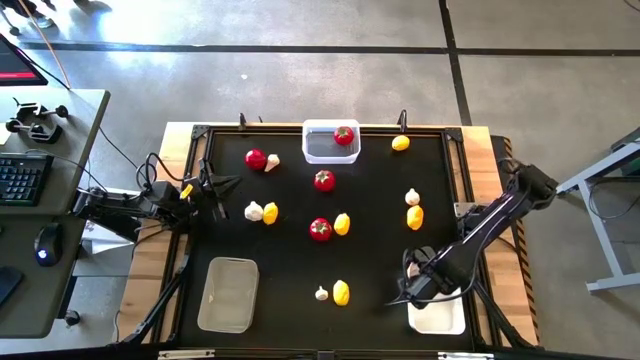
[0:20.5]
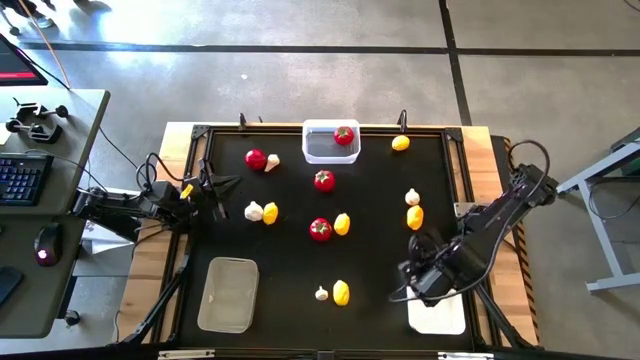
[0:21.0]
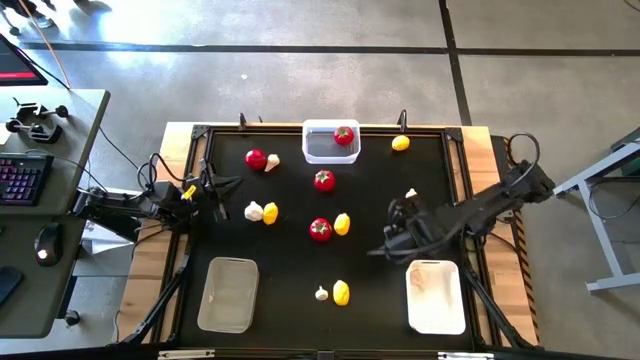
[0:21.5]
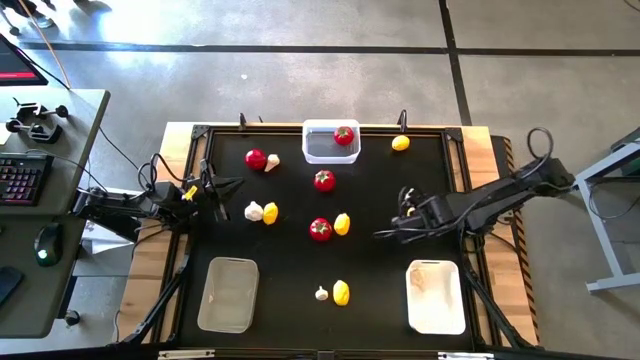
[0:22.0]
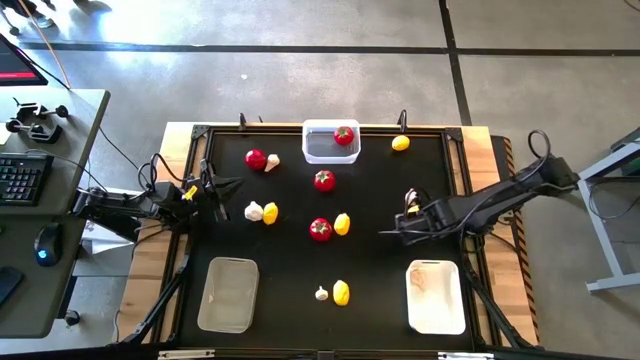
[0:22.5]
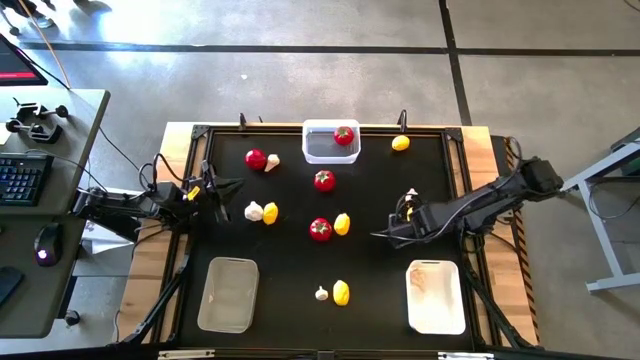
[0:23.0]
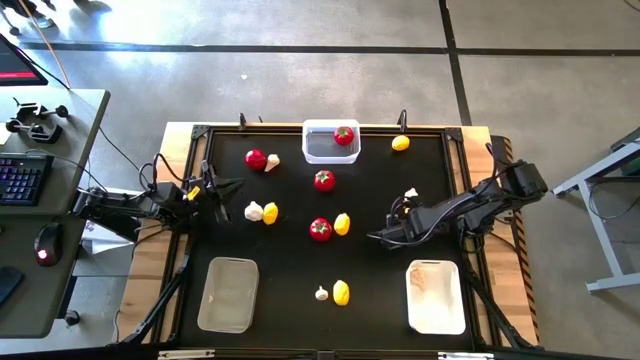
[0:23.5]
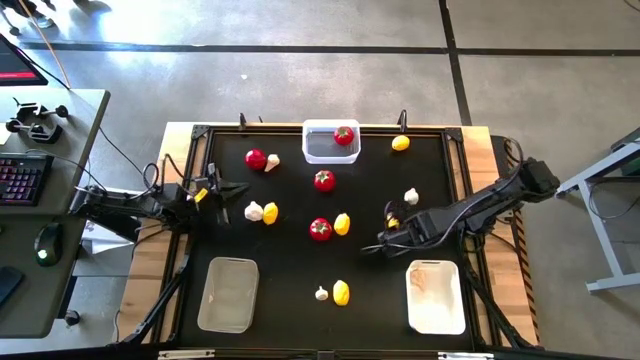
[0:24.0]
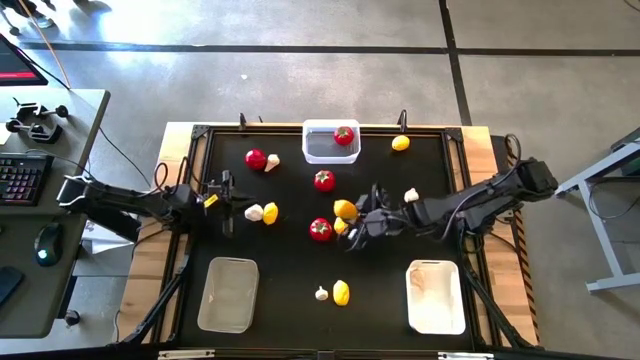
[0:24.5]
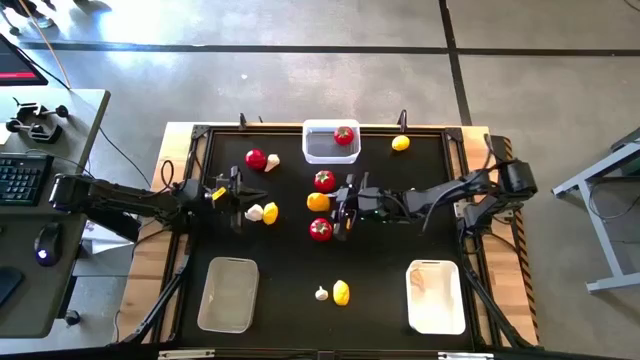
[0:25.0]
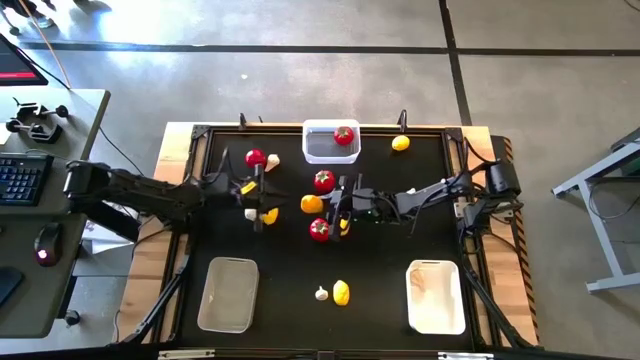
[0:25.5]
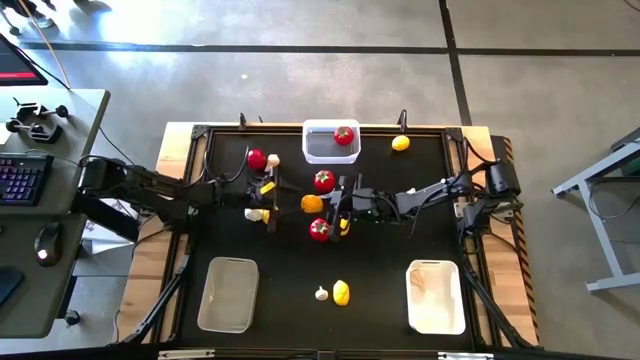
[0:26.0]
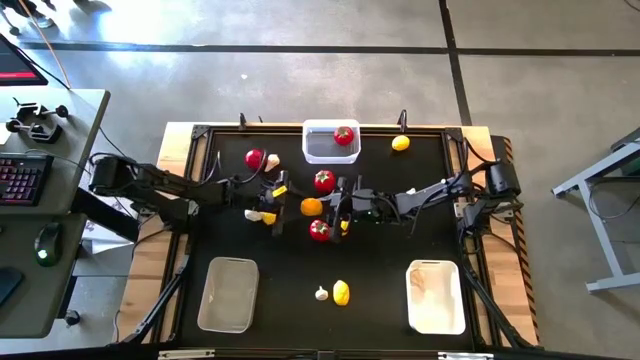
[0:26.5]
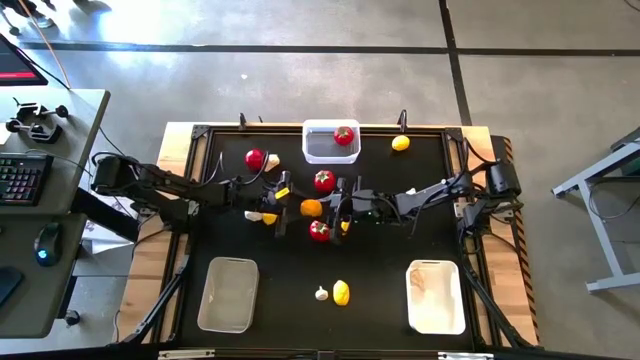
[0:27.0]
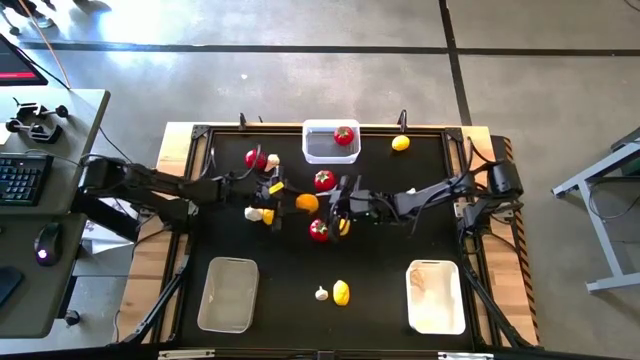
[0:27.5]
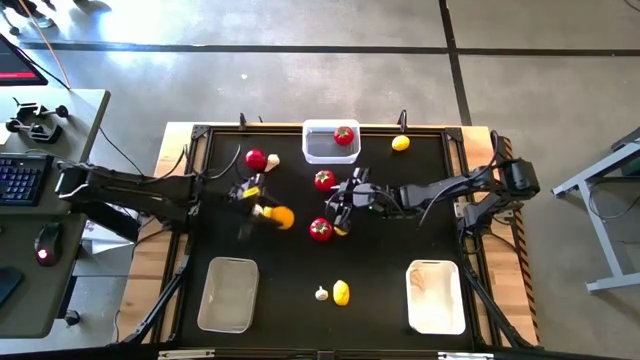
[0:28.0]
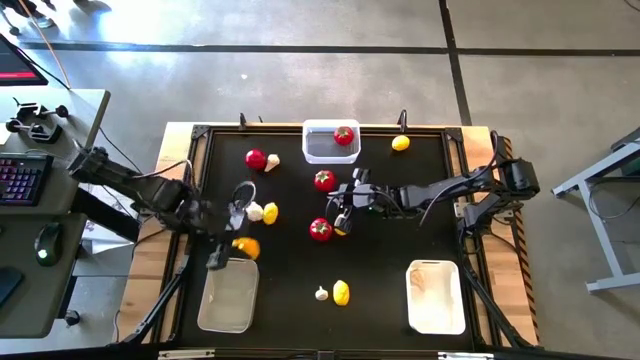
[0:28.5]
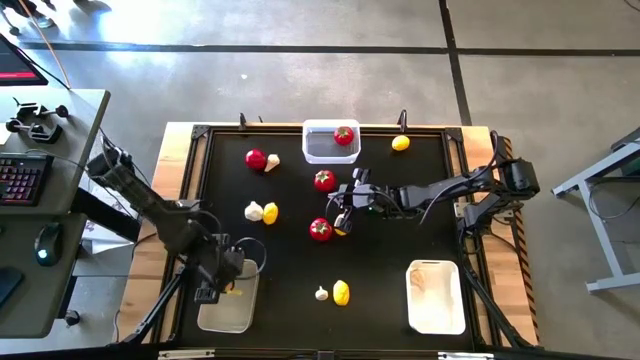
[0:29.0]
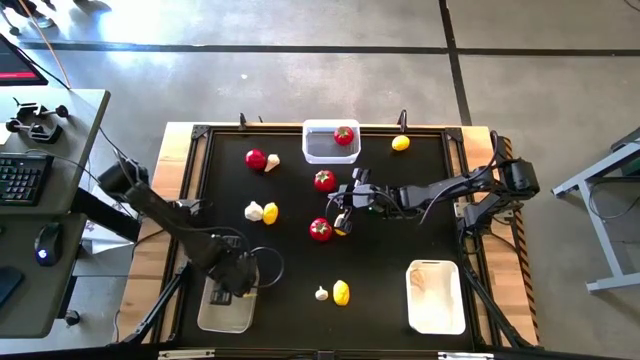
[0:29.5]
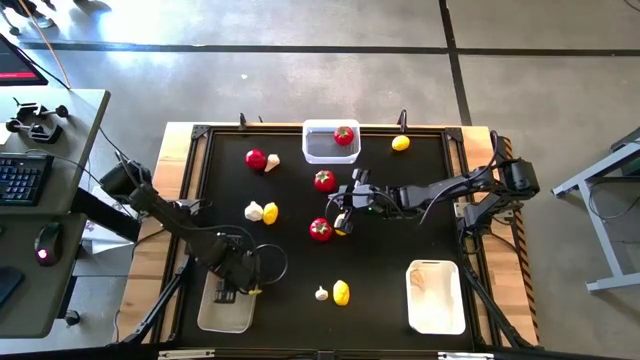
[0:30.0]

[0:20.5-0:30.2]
Task: Sort produce into baskets
Put the yellow lemon into the gray bin

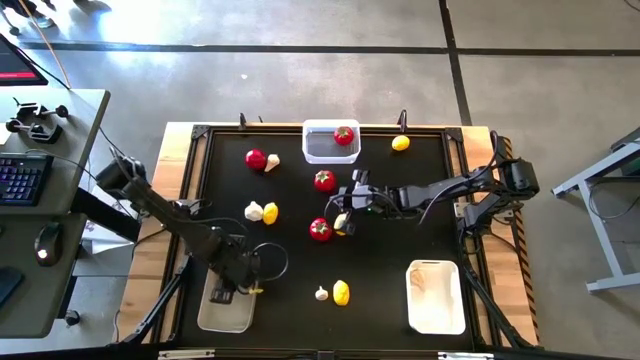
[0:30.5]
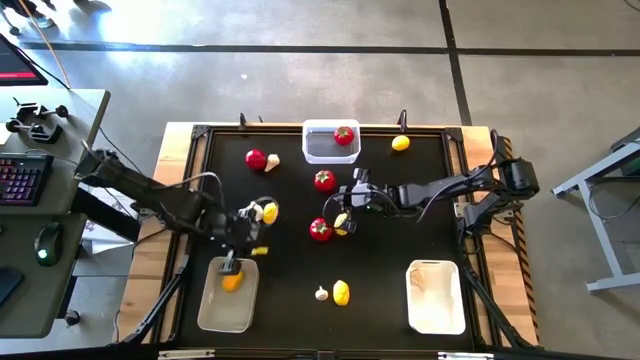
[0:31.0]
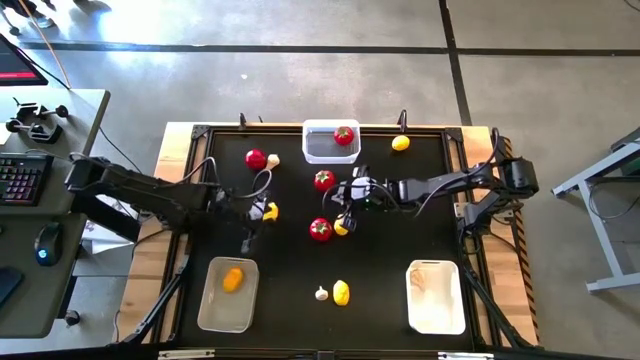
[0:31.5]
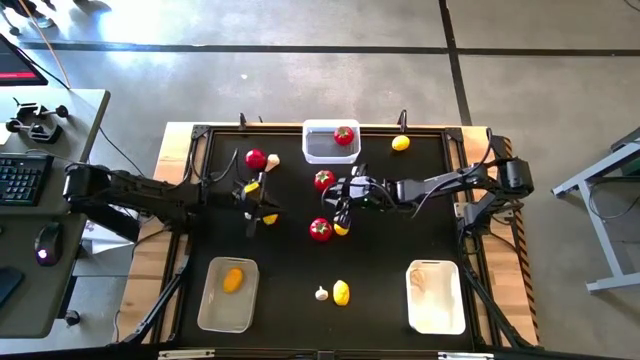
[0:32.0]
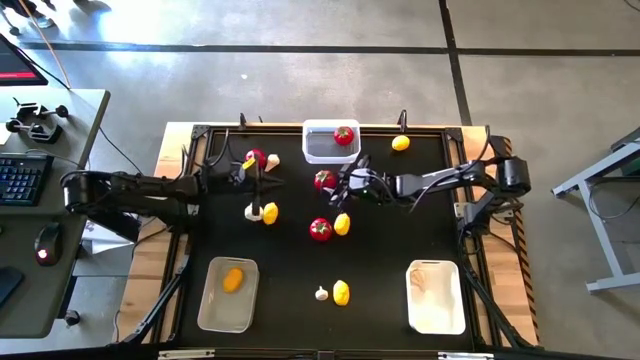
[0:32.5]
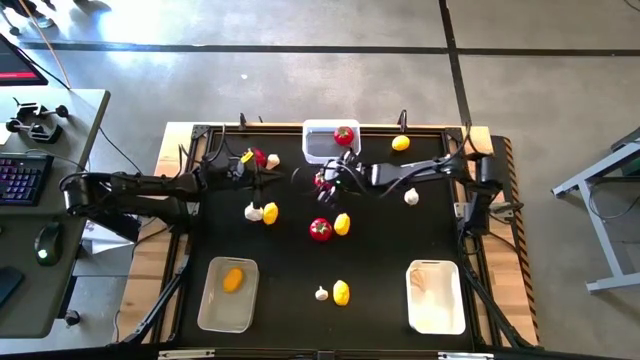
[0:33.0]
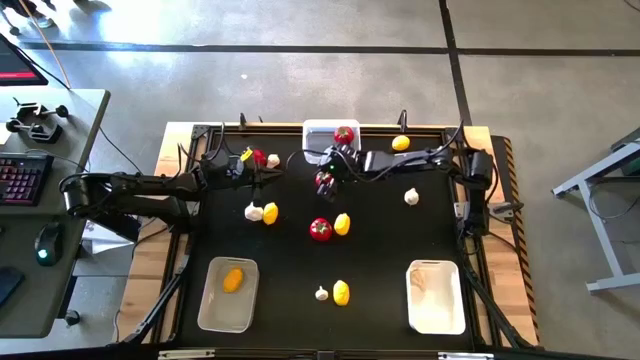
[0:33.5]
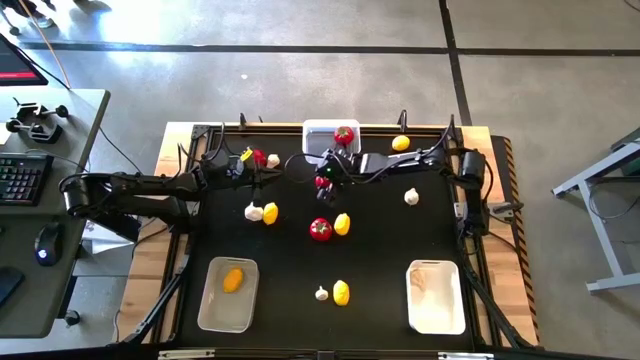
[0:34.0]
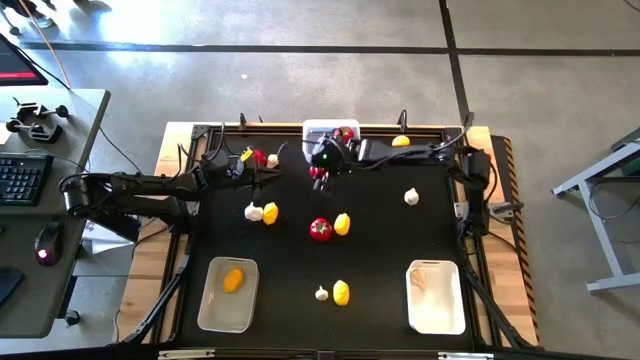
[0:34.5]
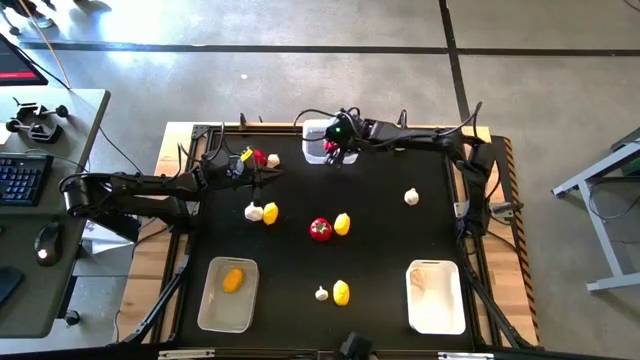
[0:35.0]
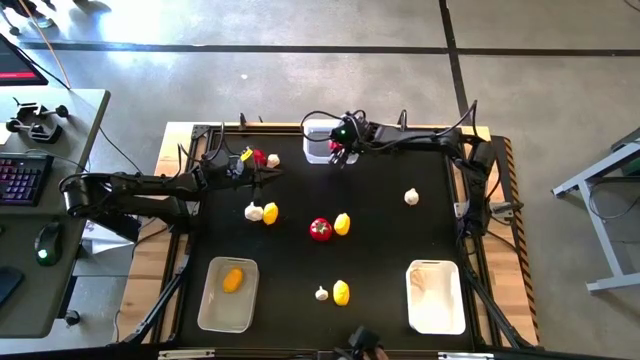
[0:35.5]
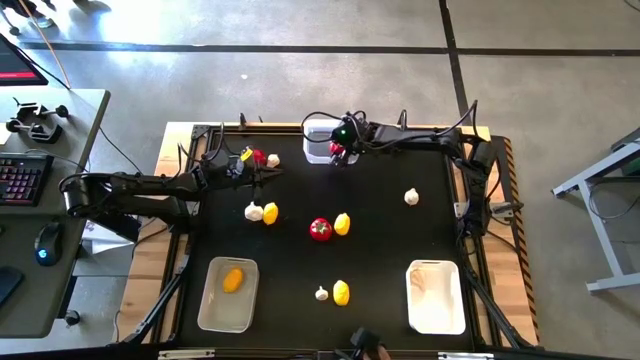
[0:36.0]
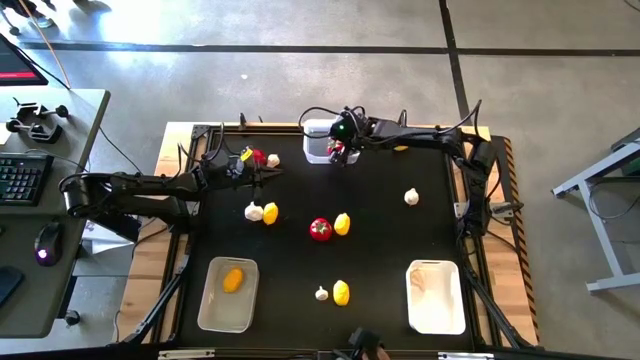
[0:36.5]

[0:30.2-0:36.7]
Put the red tomato into the transparent bin

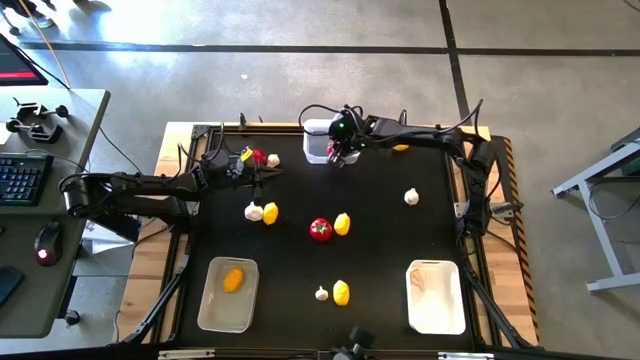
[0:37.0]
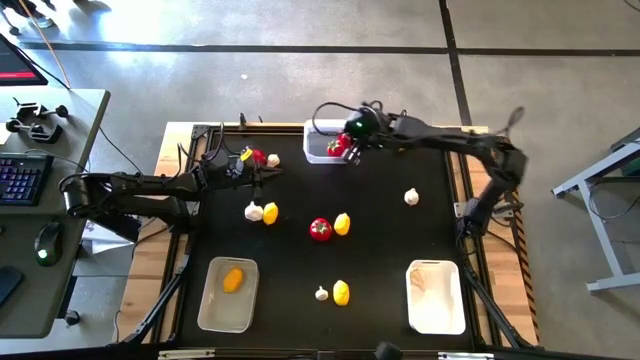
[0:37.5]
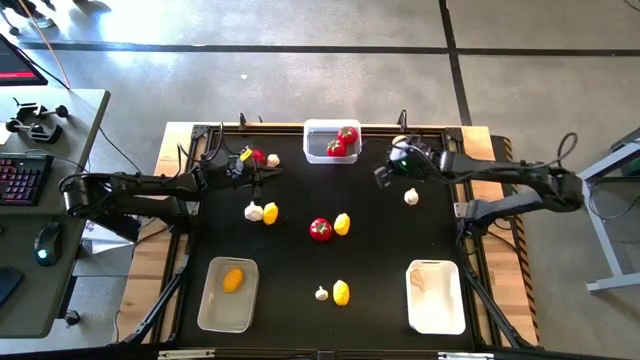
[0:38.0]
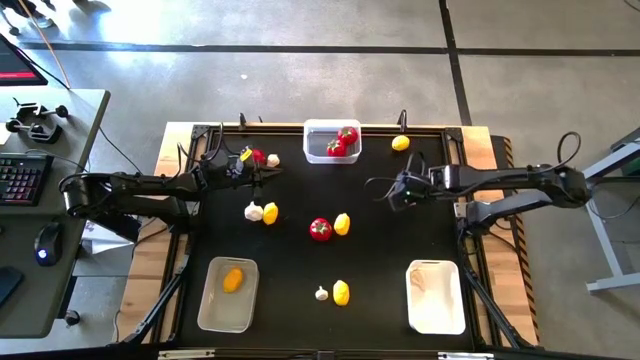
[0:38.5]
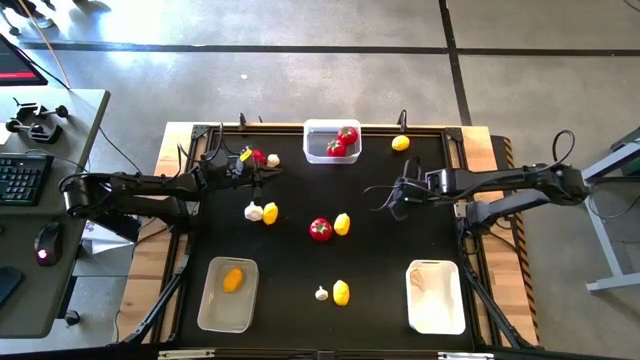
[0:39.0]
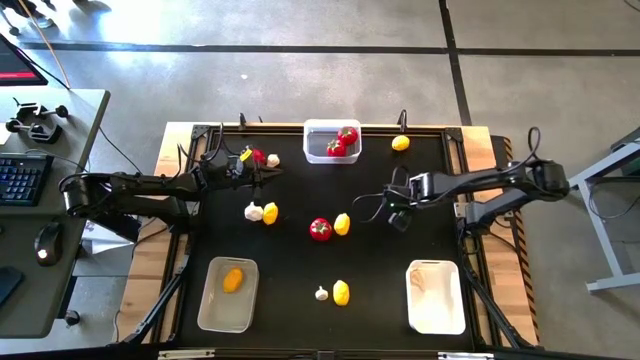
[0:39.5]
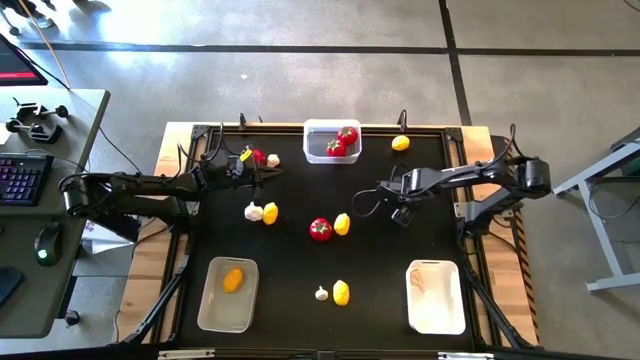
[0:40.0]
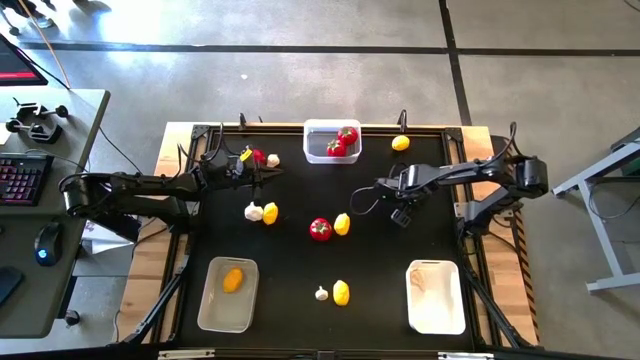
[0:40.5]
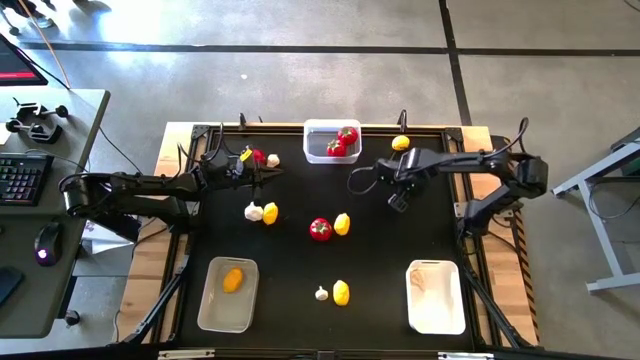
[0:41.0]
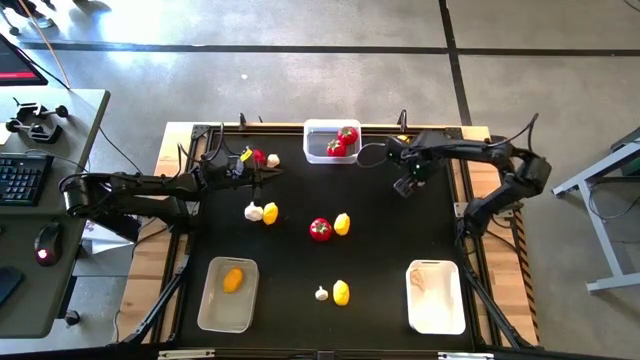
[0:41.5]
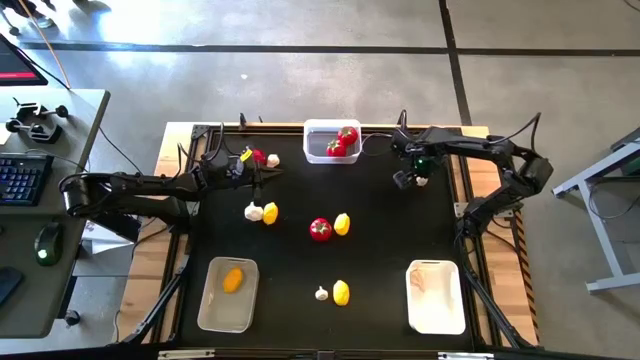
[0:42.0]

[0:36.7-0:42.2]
Put the white garlic into the white bin
